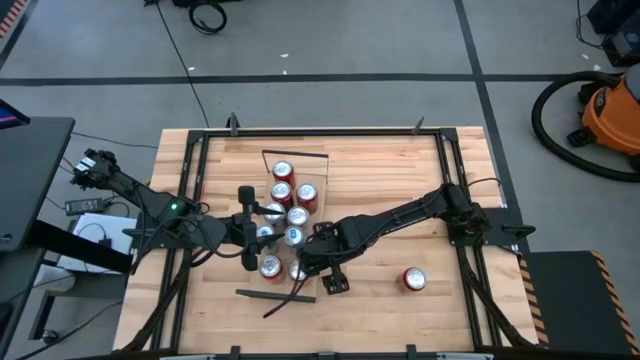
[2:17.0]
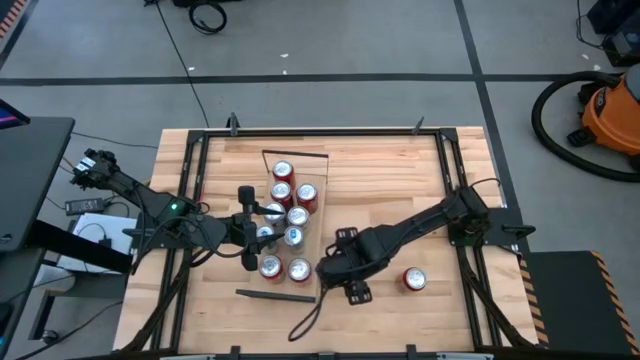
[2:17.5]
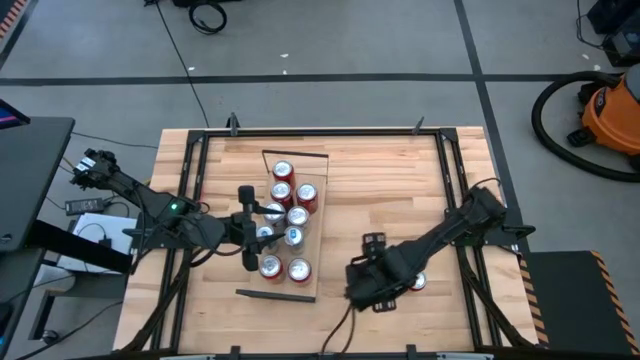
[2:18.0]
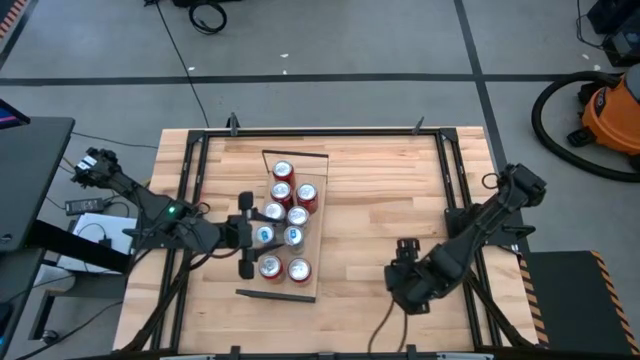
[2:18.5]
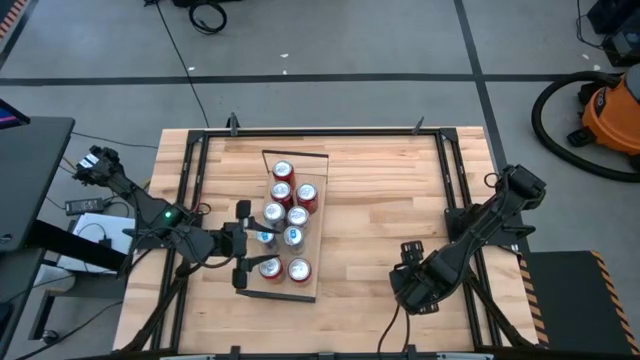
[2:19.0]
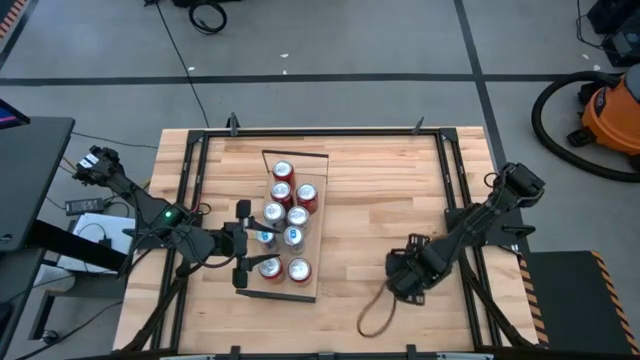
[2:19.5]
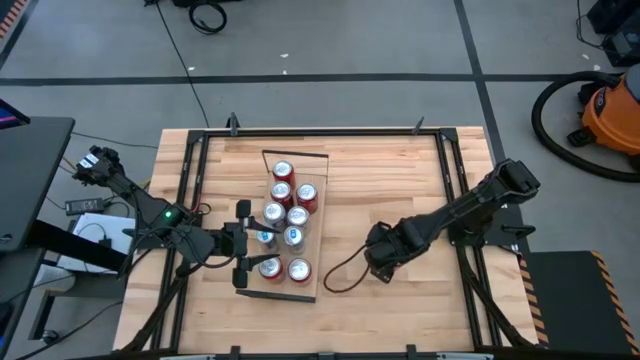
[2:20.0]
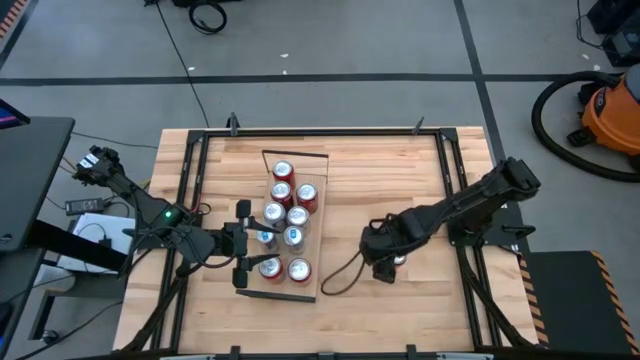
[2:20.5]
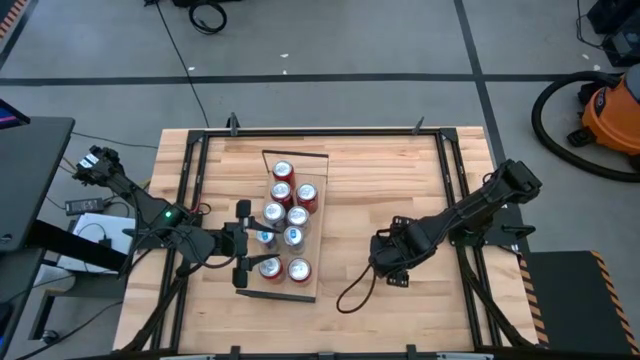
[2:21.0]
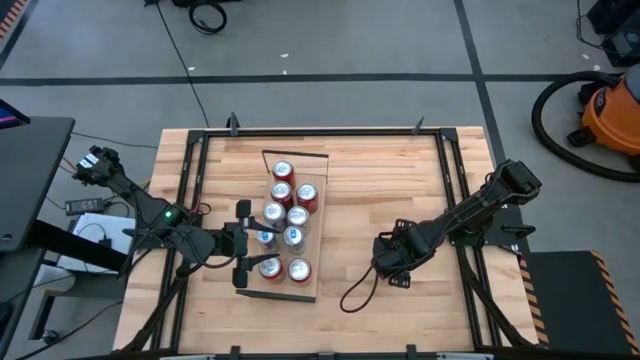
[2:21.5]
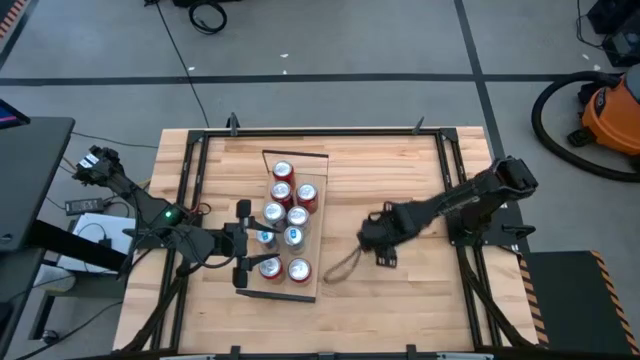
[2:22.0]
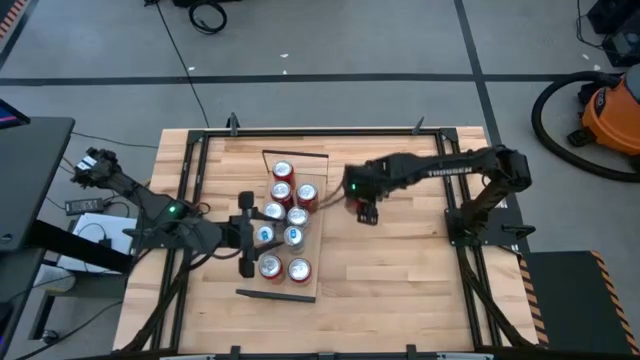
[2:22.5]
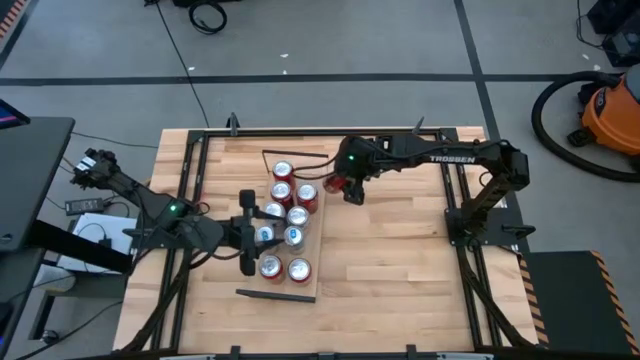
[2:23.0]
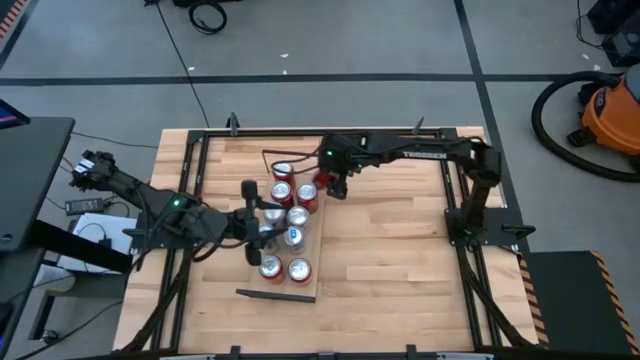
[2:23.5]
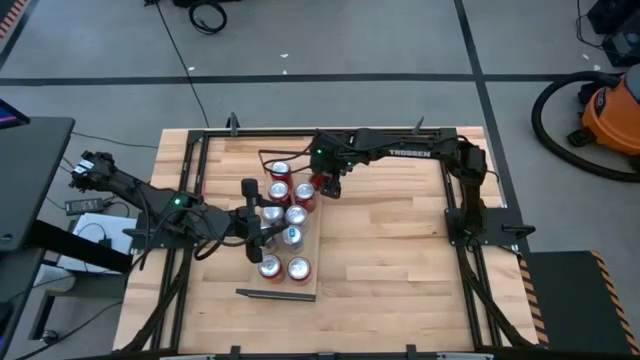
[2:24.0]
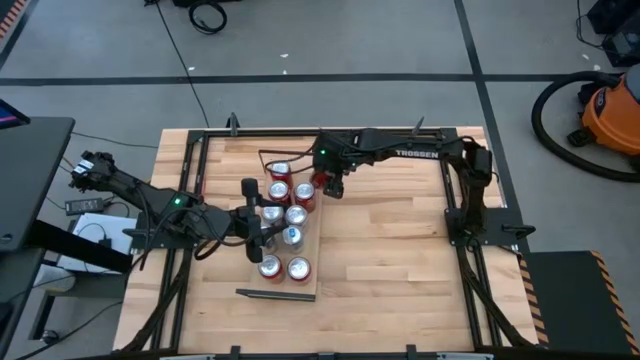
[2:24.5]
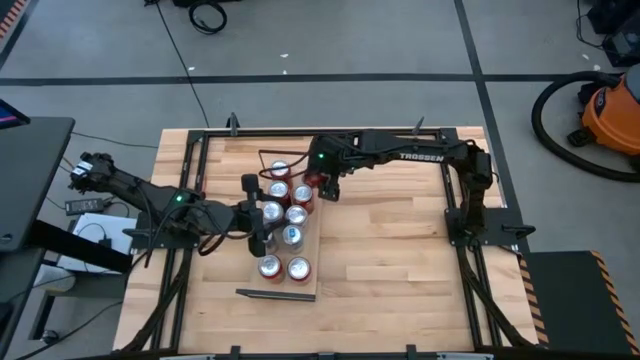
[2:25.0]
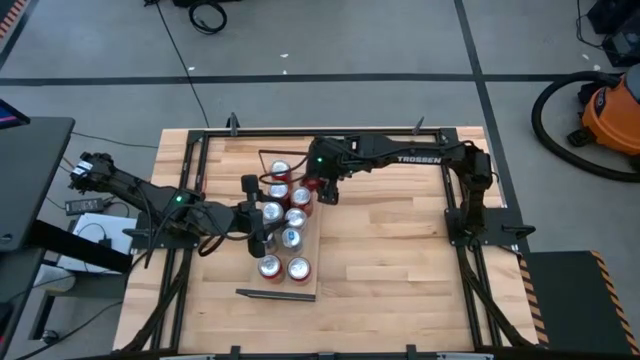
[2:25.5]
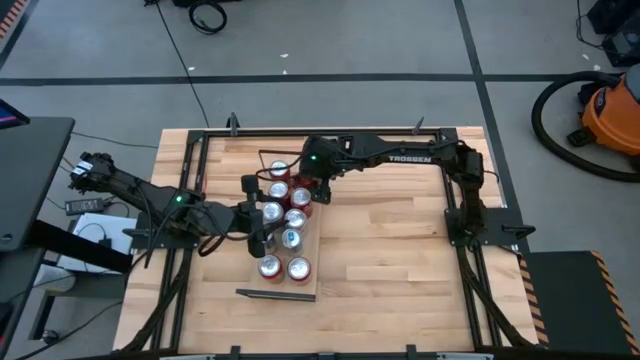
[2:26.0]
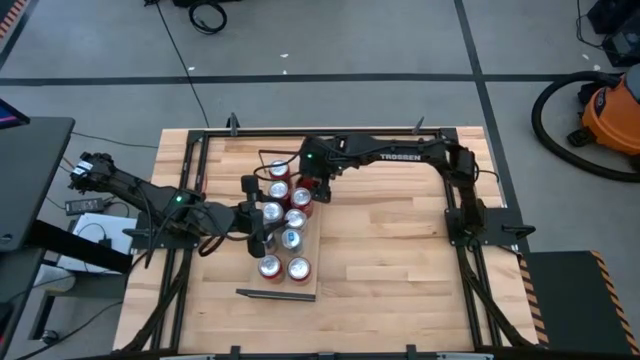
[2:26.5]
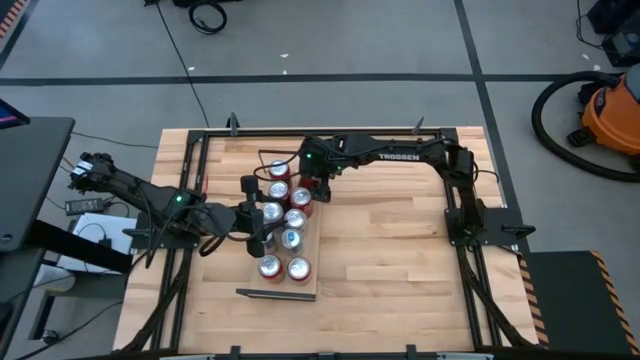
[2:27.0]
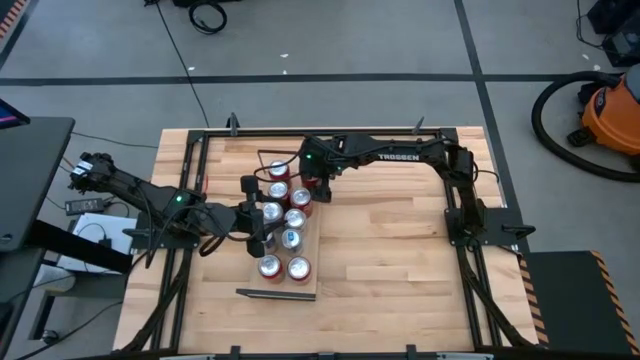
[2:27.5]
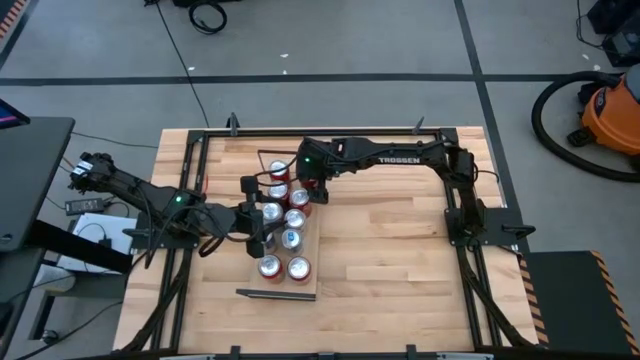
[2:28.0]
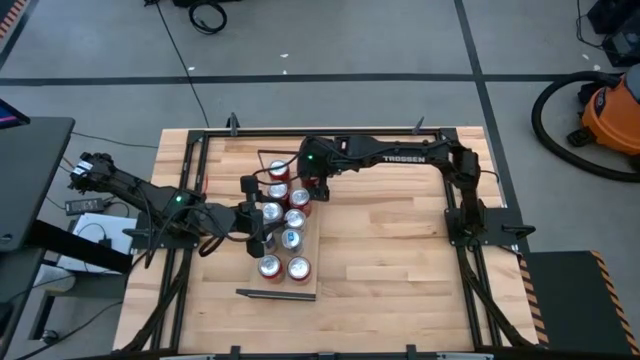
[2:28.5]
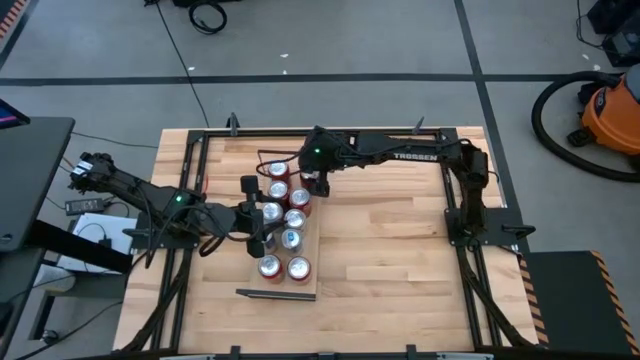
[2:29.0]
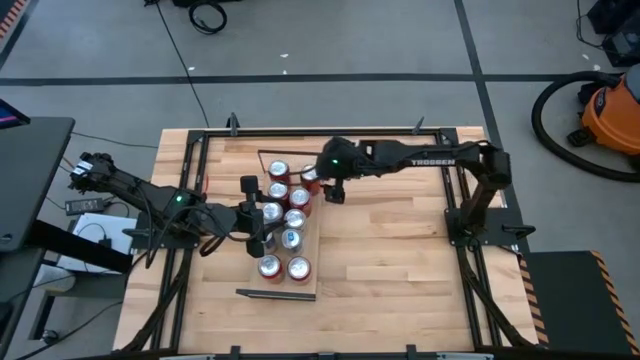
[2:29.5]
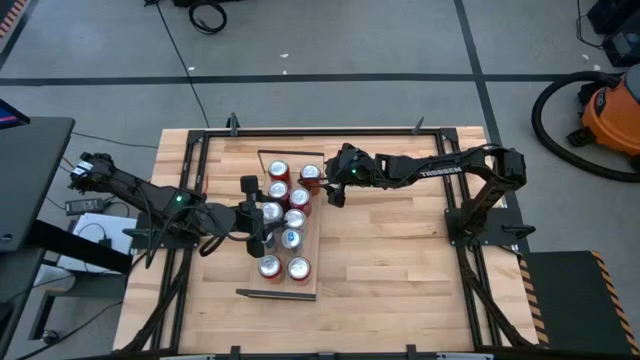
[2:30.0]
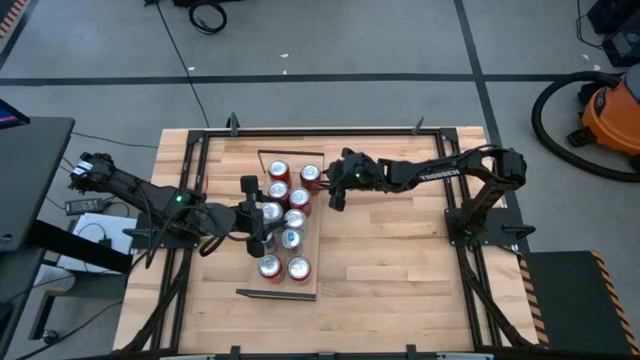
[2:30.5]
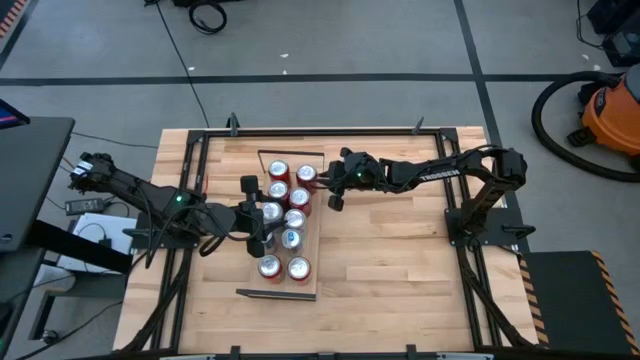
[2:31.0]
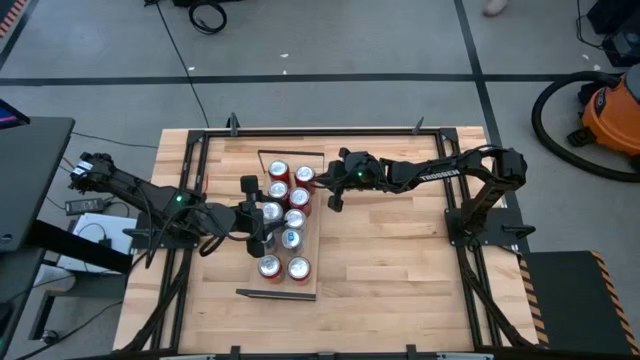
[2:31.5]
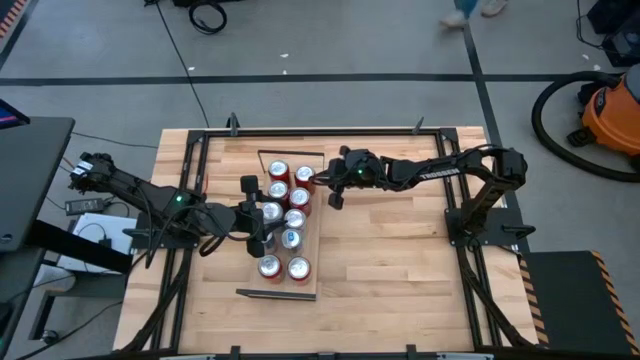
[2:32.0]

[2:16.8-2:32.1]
Task: Place canned beverage on shelf
Put the red black soda can on the shelf aligned with the red black soda can

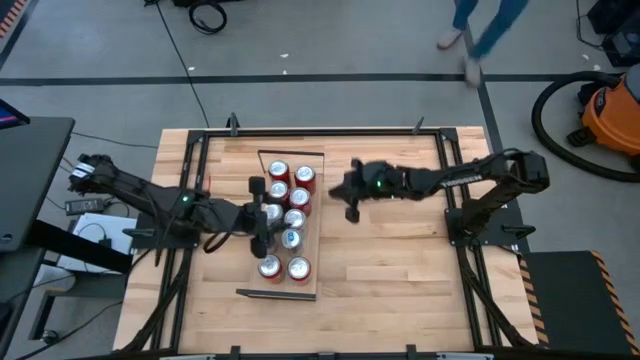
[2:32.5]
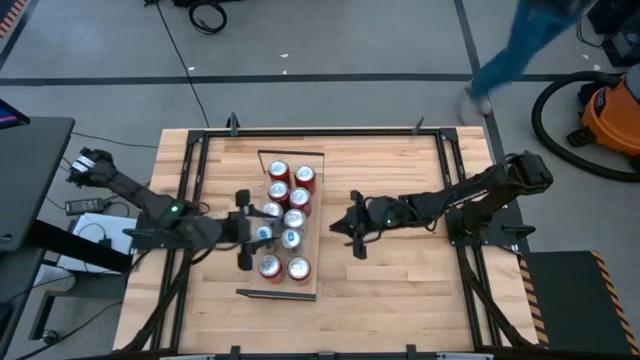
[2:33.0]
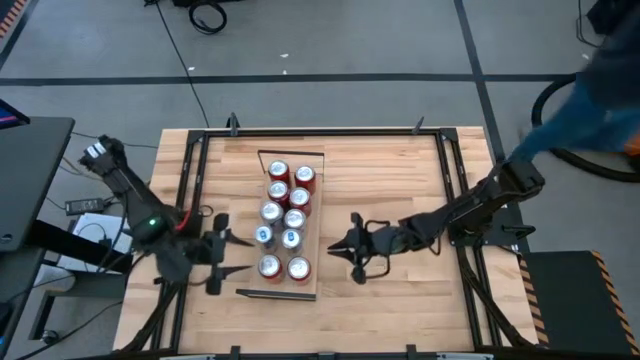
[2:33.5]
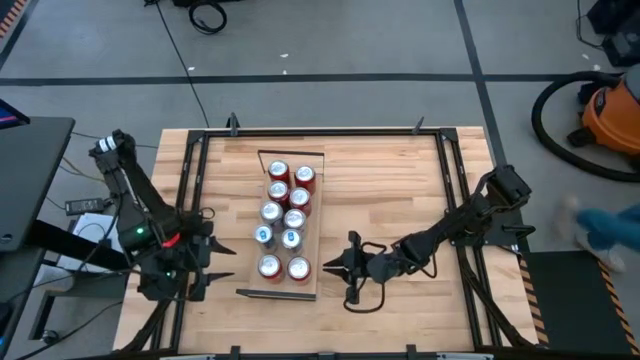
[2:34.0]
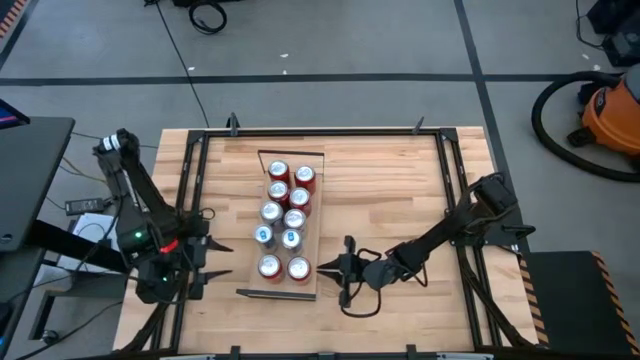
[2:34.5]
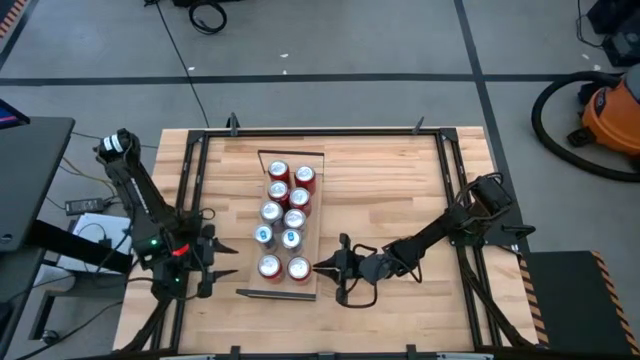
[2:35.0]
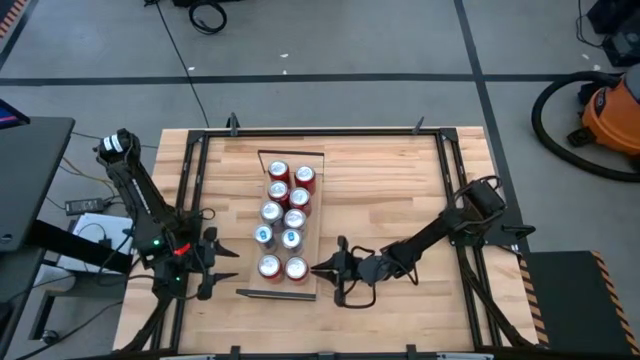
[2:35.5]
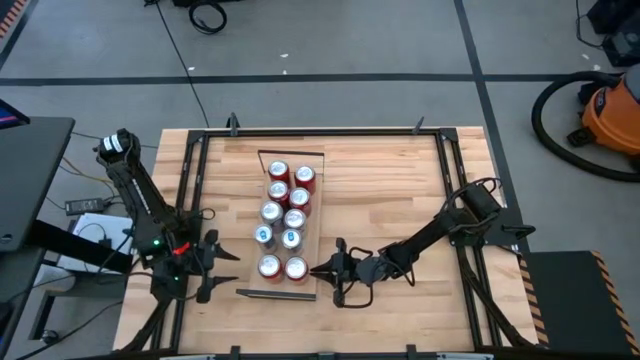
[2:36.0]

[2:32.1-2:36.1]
Adjust the red soda can on the shelf

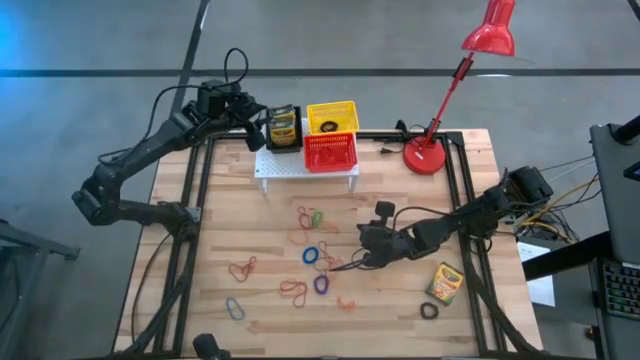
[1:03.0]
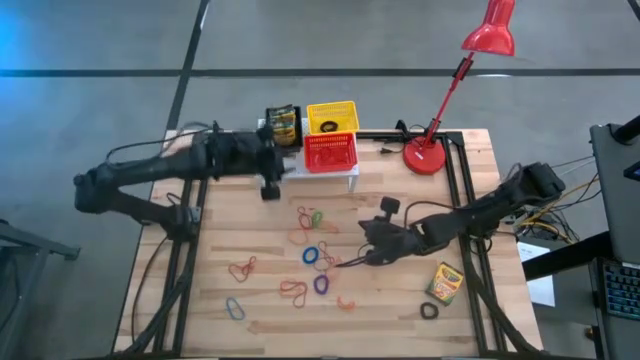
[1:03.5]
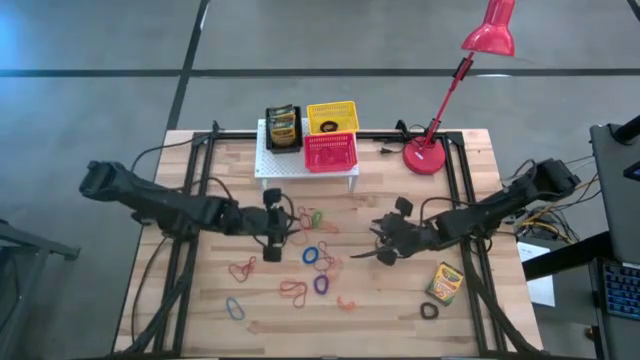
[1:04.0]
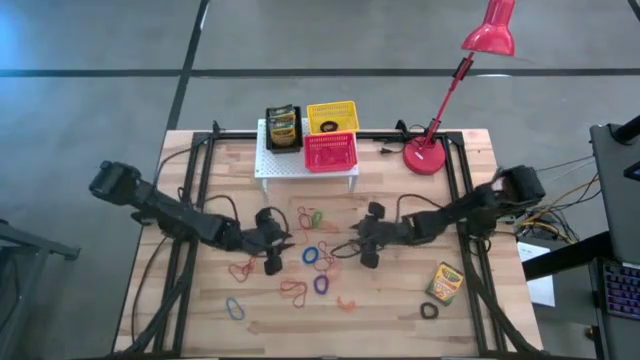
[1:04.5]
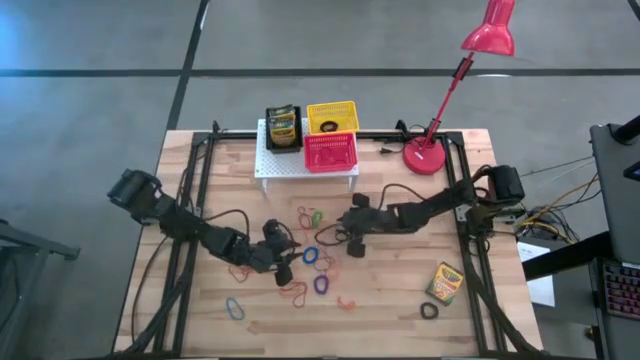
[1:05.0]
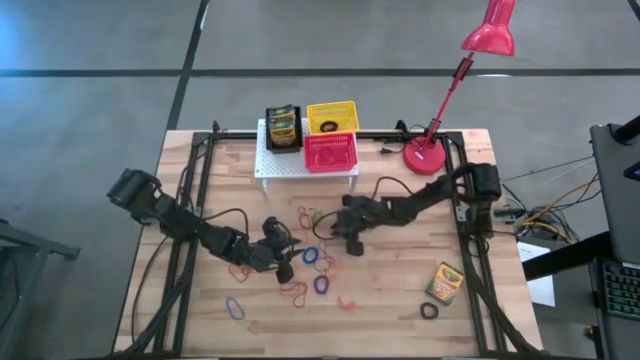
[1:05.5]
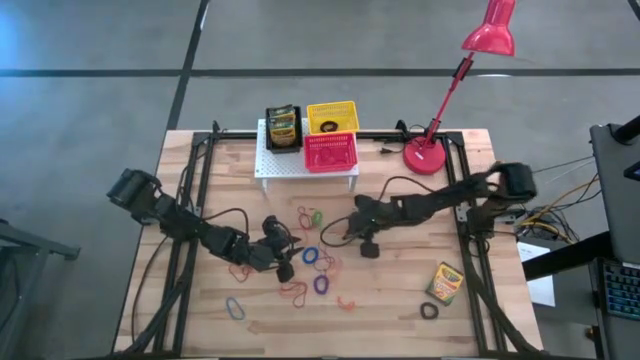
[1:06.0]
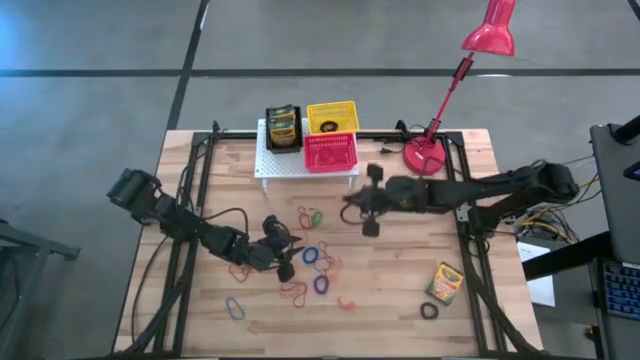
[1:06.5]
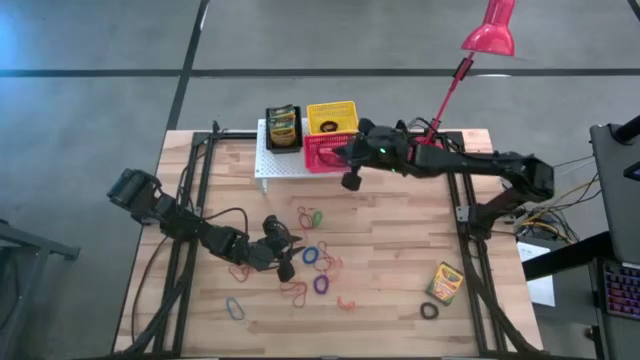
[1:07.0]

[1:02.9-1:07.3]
Task: Pick & Place Office Desk Supplies
Put the orange rubber band into the red bin on the shelf
